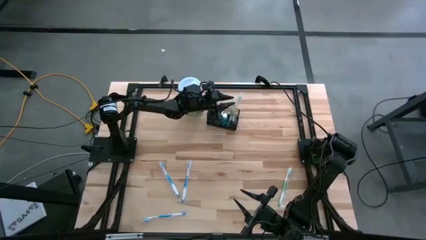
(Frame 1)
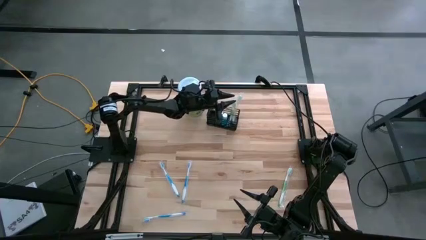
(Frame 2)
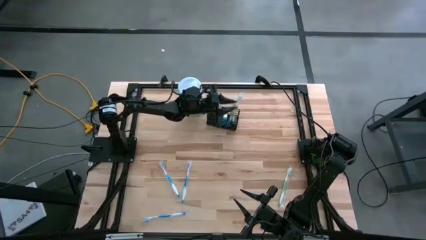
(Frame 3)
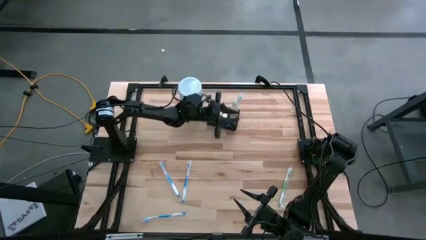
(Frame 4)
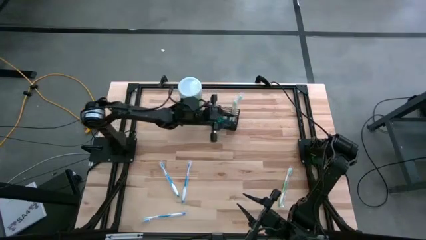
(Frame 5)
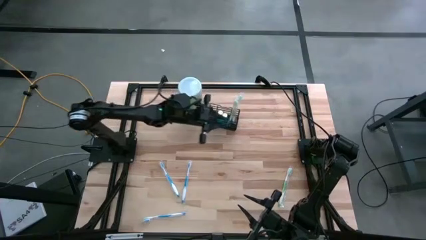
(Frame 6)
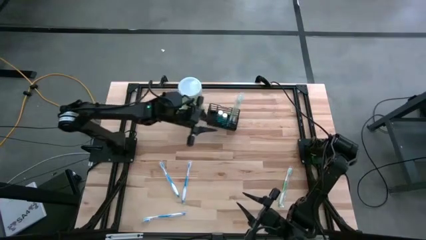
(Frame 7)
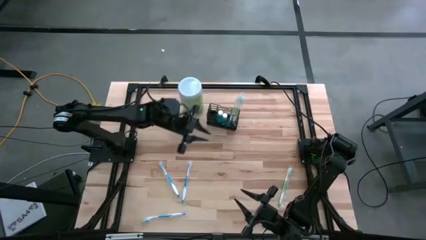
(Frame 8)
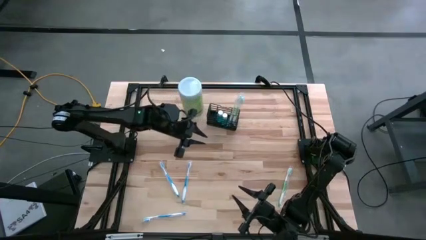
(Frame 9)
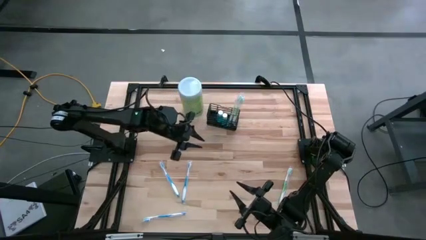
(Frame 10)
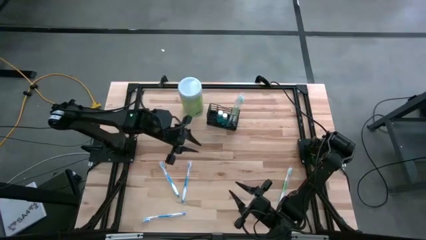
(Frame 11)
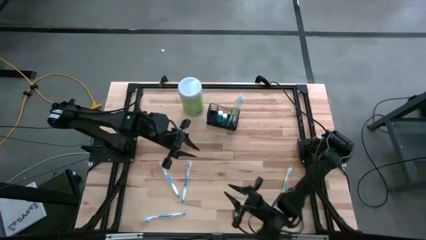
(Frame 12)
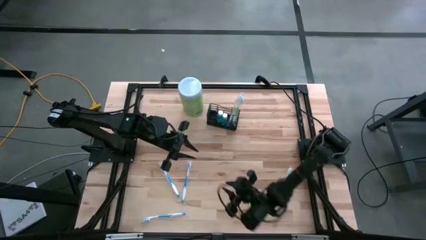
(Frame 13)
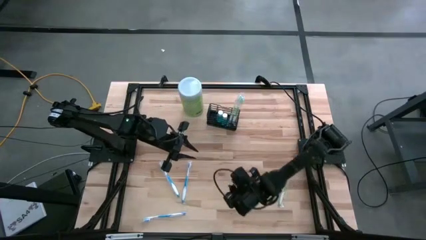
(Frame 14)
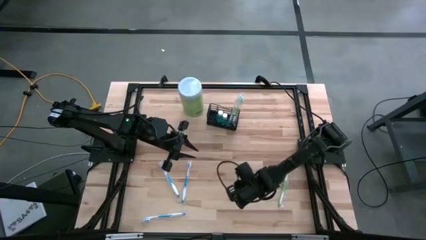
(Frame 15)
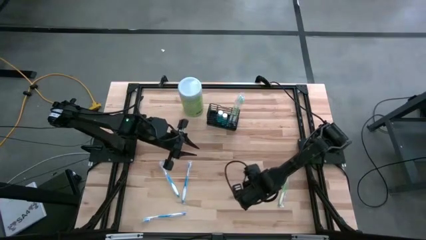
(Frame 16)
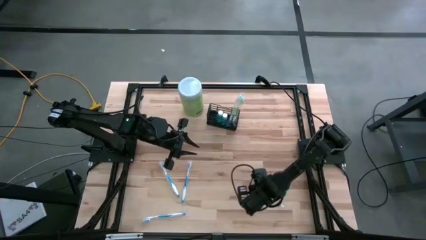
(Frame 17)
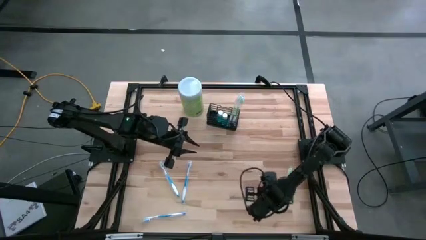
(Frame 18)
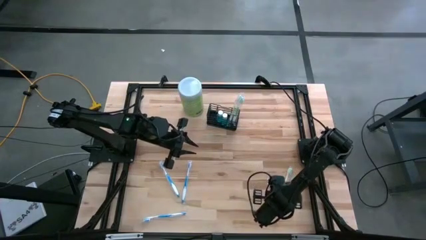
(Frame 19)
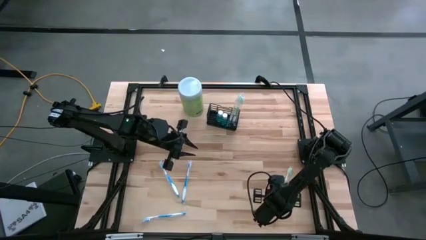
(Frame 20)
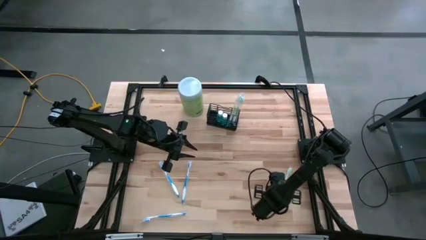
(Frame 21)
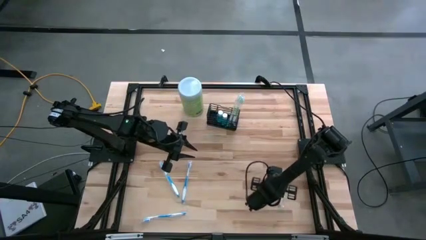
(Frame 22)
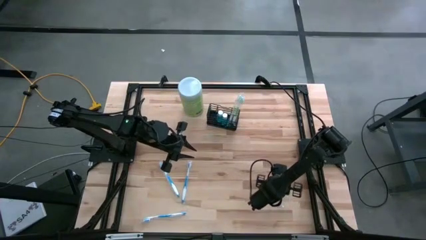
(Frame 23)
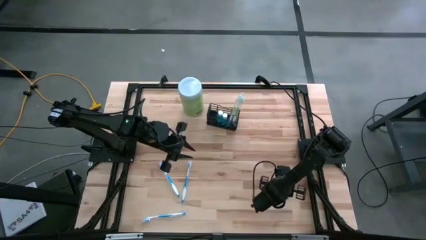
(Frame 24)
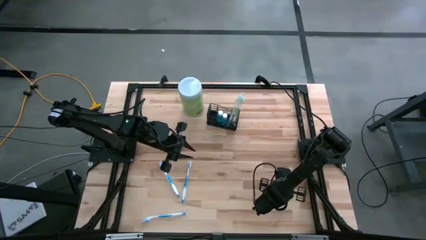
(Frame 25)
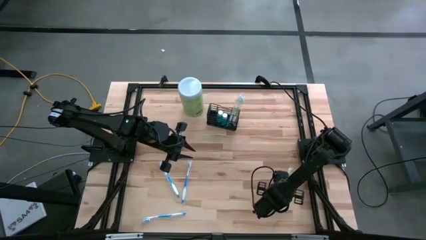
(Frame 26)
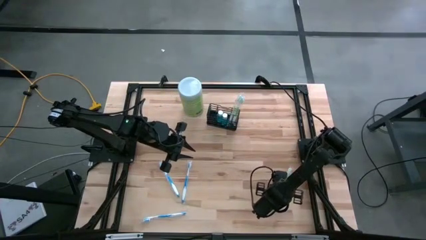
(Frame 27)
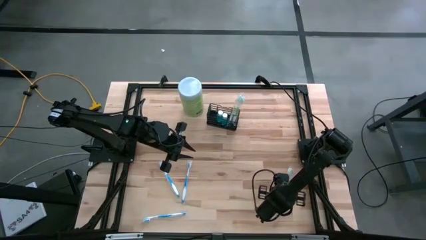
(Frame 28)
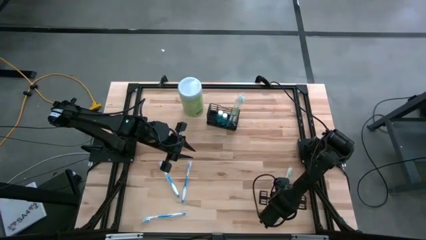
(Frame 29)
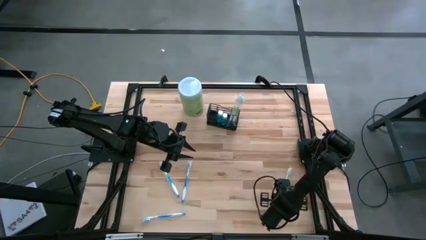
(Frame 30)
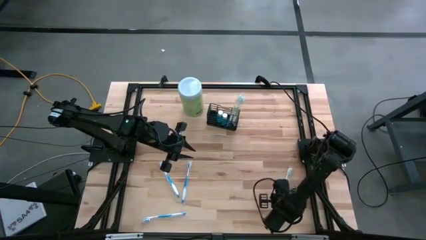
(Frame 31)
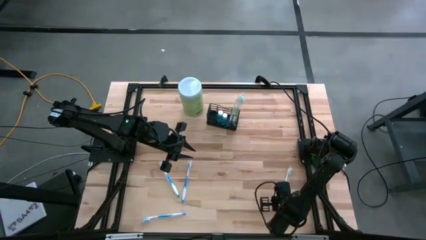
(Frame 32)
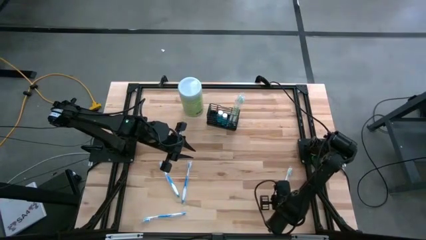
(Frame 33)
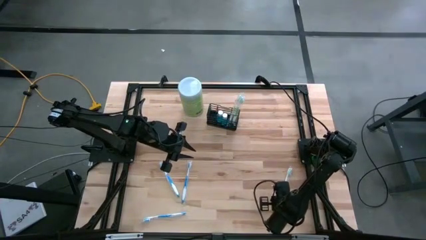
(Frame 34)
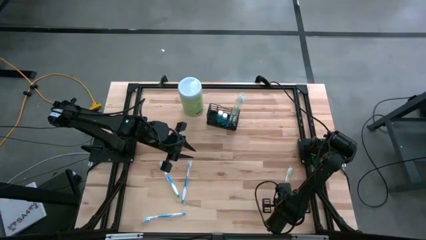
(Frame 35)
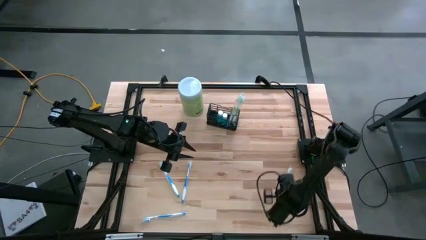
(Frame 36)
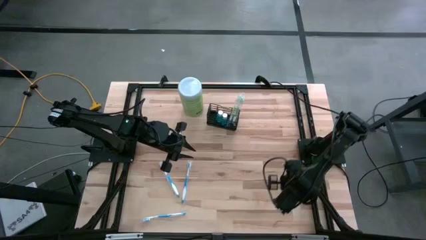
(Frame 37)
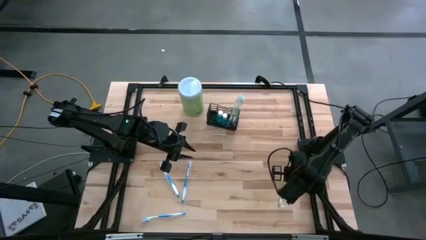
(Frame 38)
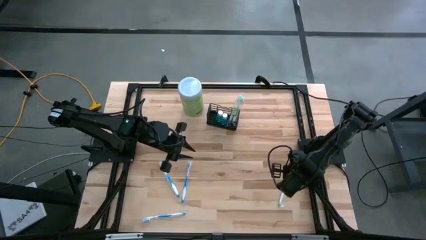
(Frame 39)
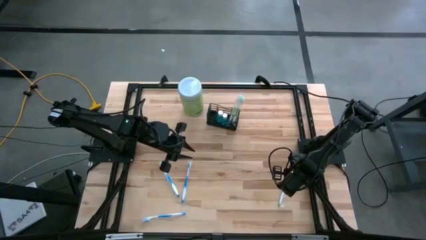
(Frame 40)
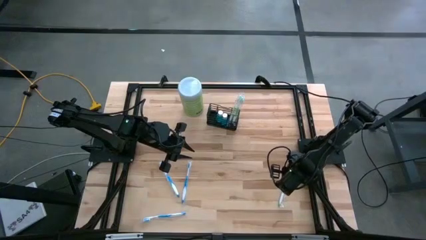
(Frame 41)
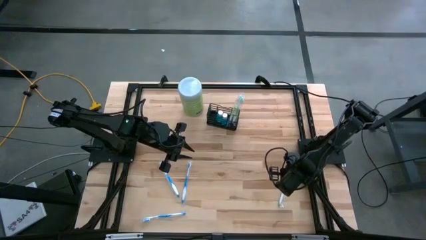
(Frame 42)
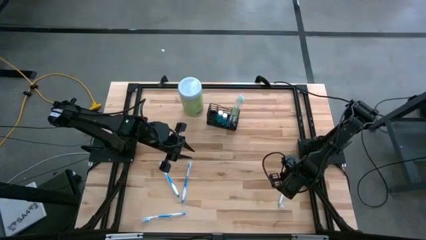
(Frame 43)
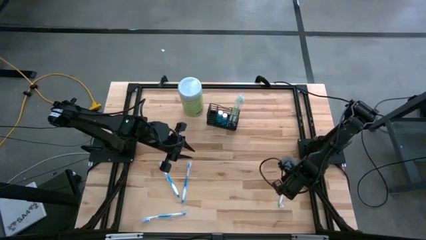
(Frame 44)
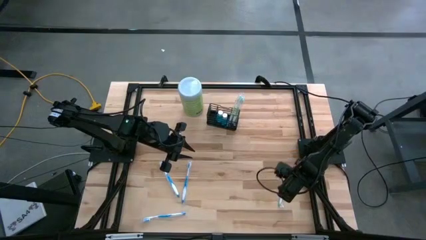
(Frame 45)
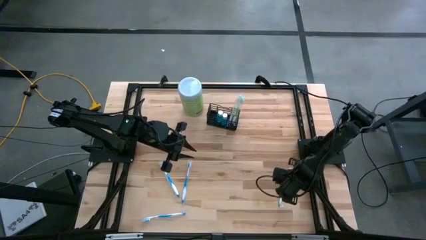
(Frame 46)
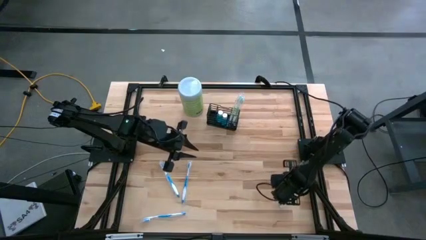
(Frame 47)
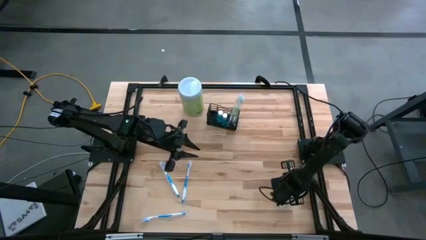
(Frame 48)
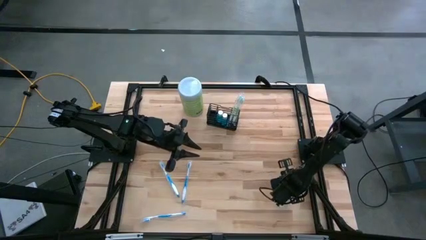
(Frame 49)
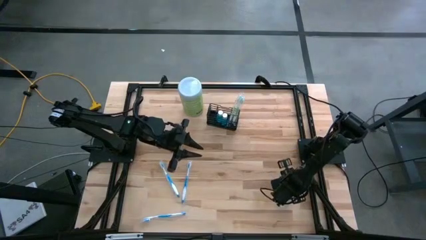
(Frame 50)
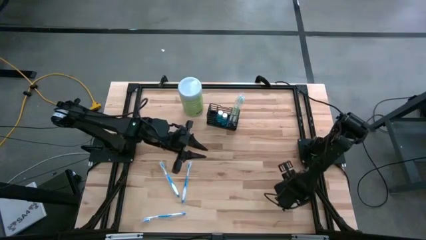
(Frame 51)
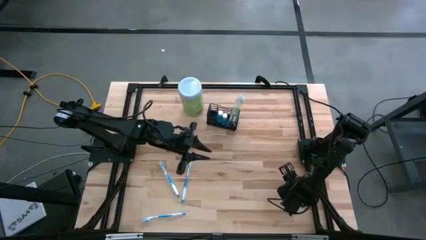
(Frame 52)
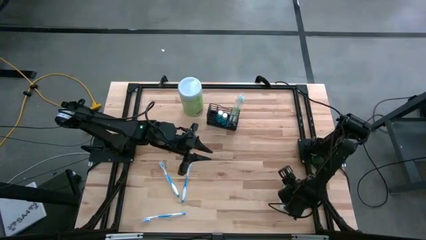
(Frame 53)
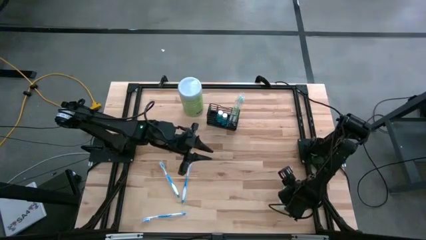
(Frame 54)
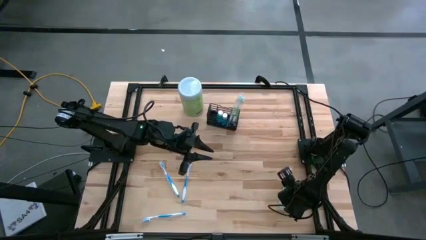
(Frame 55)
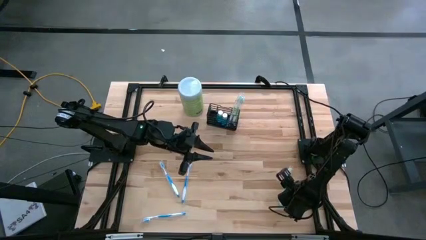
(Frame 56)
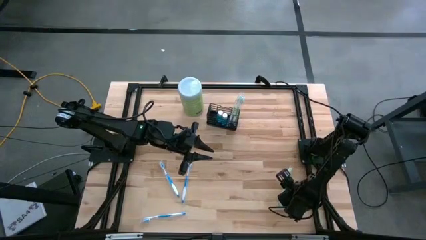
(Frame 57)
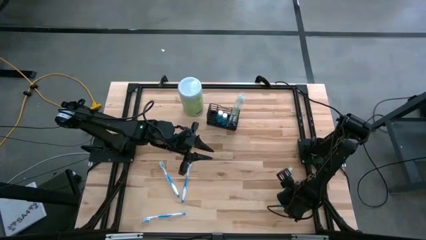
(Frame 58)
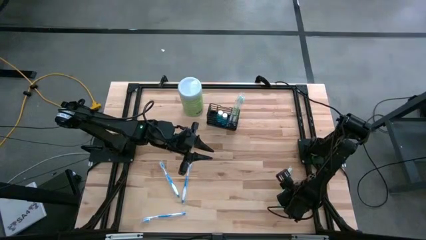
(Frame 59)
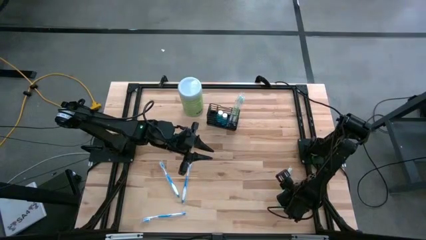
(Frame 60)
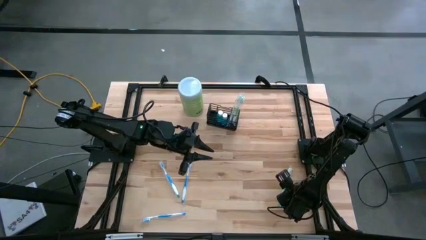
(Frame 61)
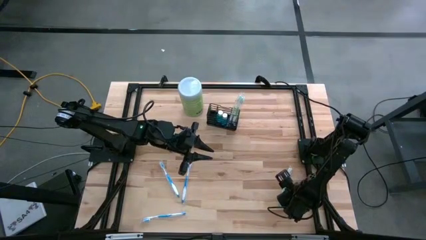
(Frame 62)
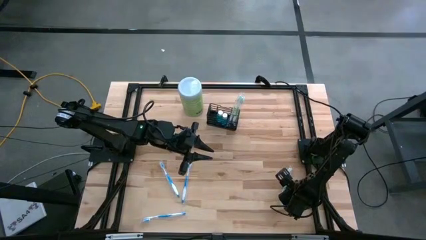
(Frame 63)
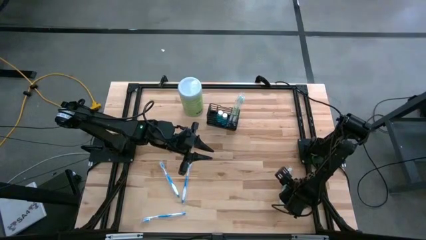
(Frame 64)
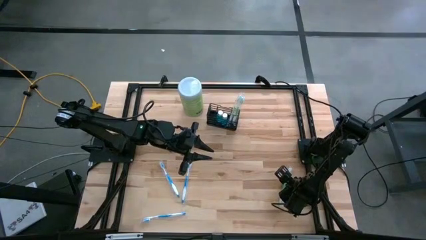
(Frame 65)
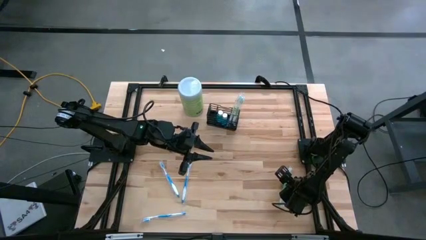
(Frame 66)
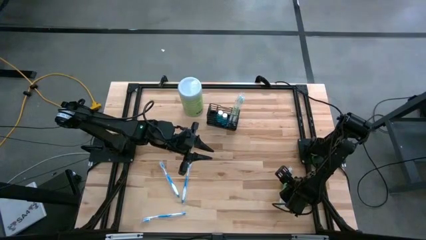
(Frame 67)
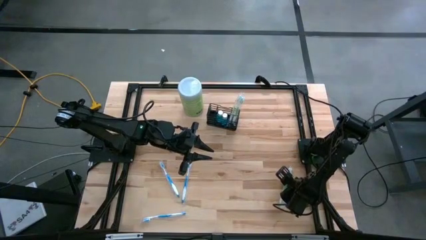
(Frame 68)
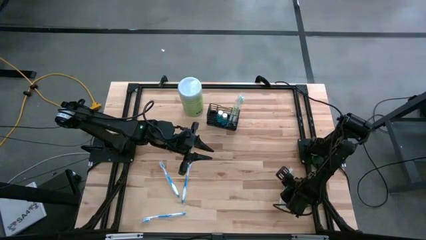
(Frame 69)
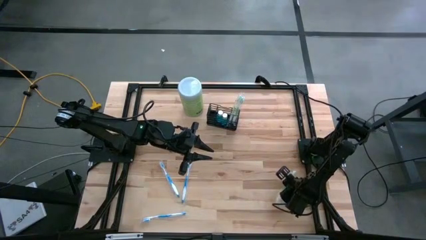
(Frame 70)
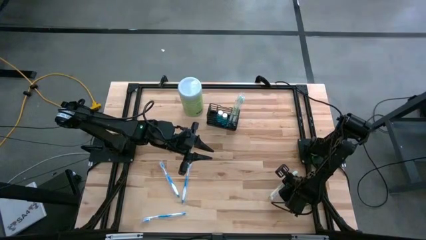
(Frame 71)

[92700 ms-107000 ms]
Task: Pick & Place toothbrushing station
Put the green toothbrush into the mesh organizer

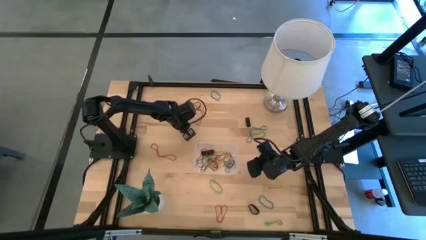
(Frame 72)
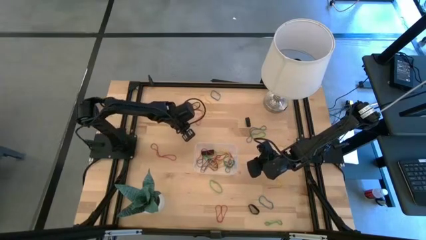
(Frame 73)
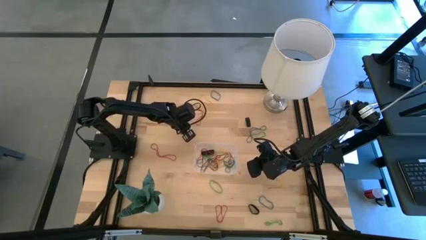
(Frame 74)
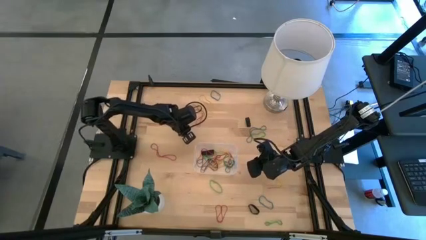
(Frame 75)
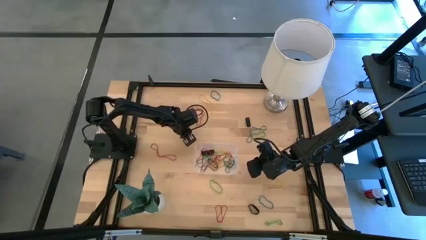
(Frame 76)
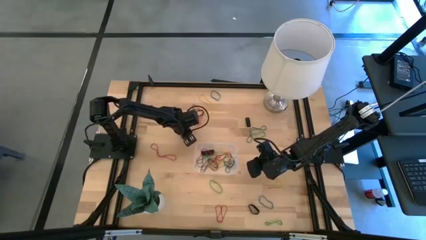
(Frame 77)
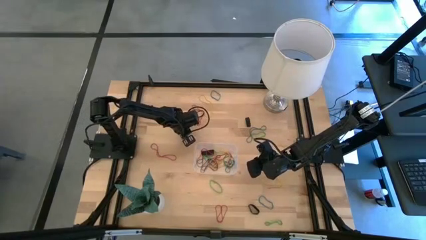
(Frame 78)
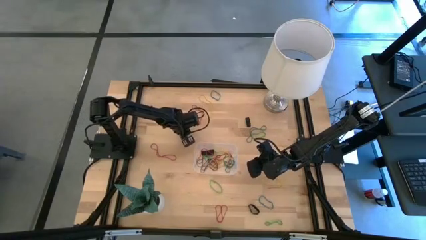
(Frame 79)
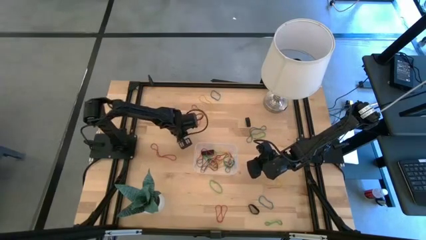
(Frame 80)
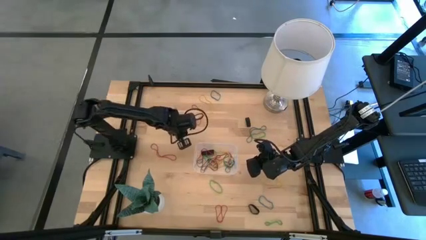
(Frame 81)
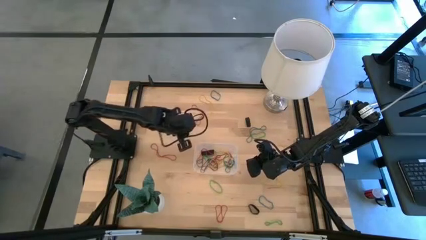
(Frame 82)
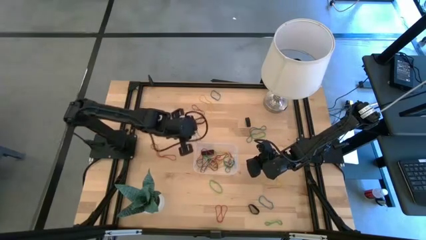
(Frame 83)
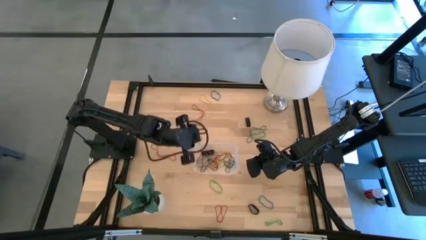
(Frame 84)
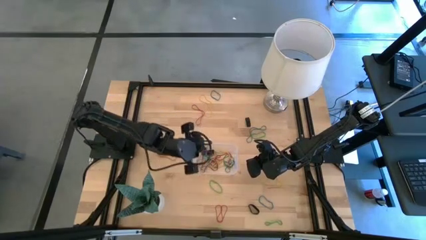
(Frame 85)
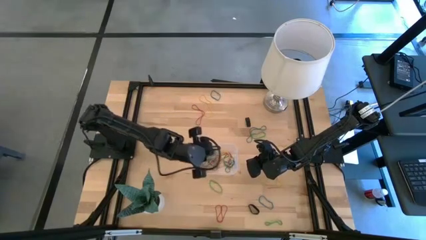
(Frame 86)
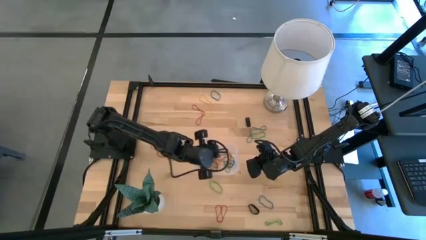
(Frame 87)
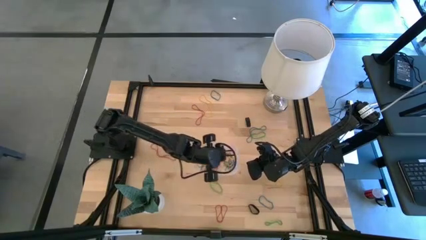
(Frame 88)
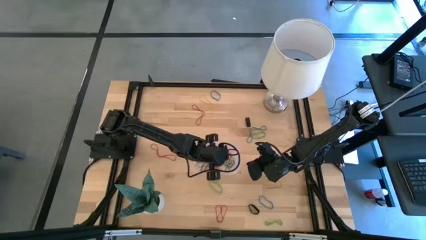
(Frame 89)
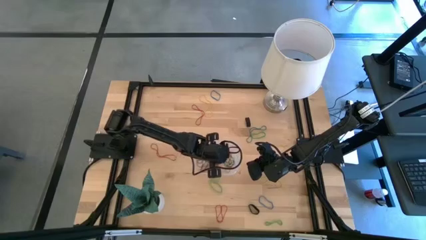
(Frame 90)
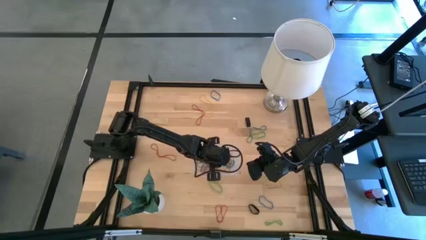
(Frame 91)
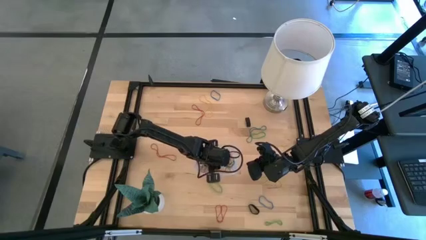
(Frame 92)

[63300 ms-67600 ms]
Task: Pick and place rubber bands into bin
Put the blue rubber band into the transparent bin
